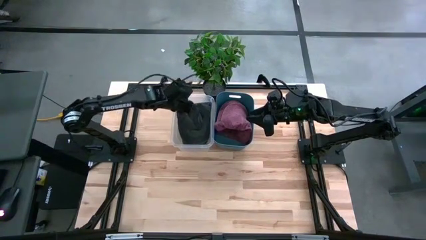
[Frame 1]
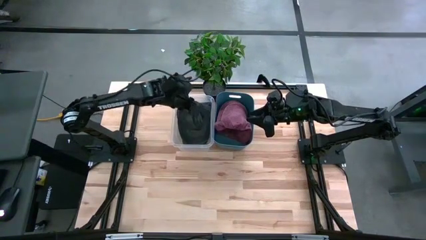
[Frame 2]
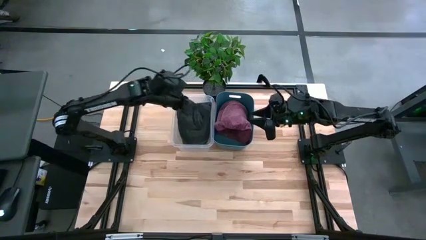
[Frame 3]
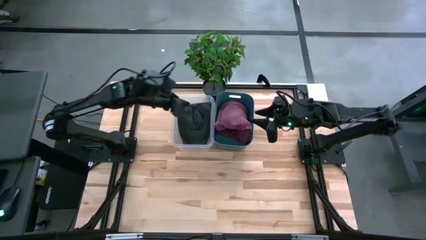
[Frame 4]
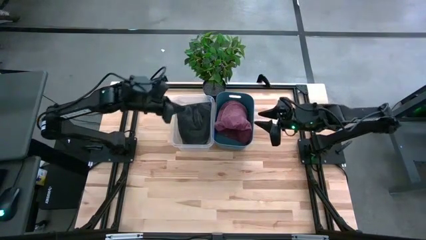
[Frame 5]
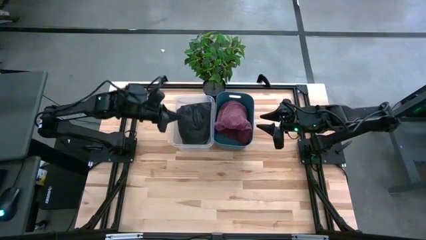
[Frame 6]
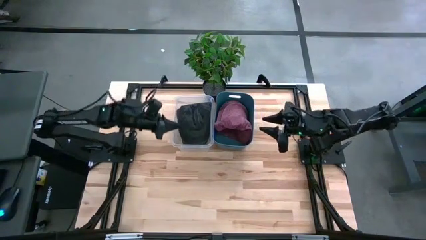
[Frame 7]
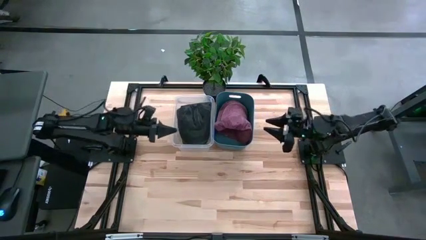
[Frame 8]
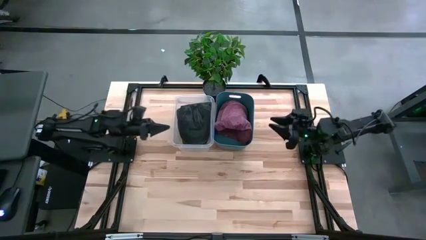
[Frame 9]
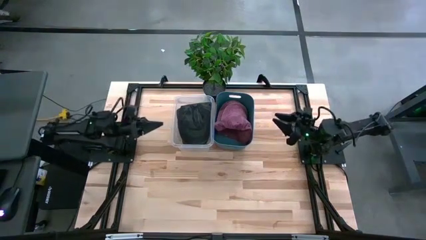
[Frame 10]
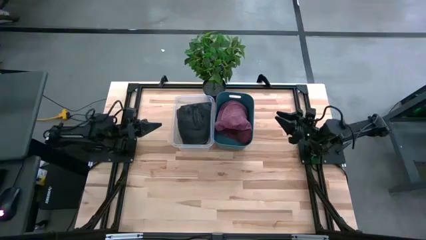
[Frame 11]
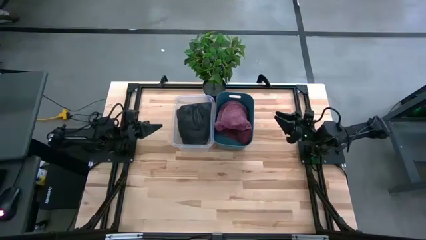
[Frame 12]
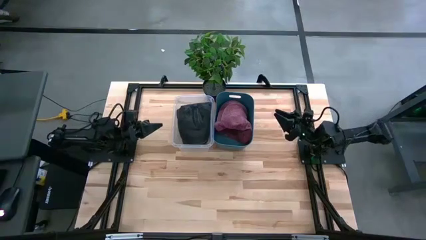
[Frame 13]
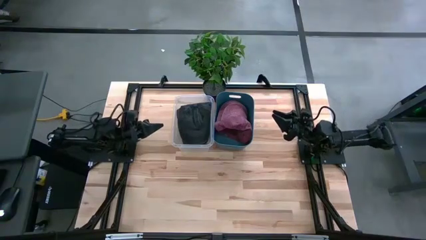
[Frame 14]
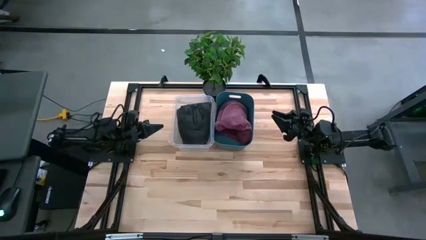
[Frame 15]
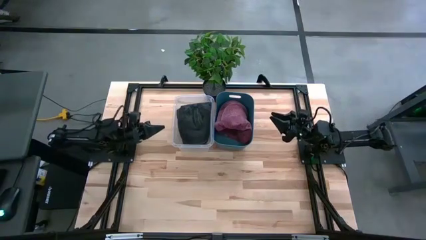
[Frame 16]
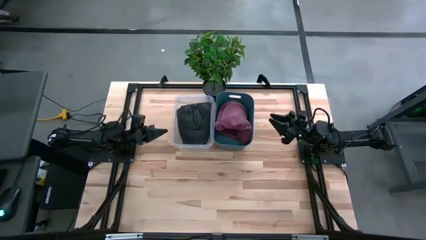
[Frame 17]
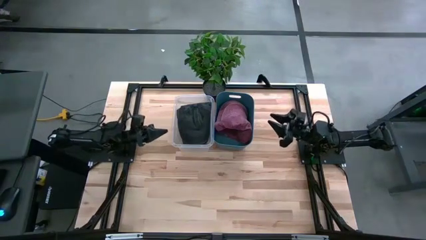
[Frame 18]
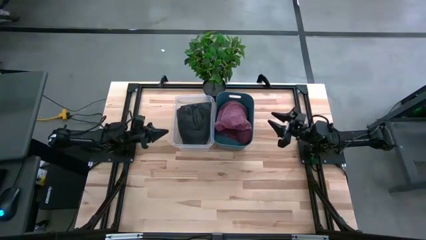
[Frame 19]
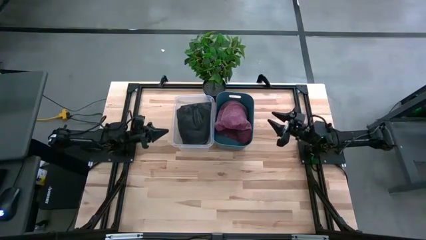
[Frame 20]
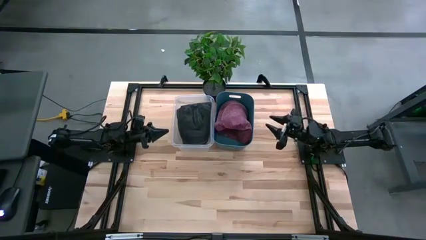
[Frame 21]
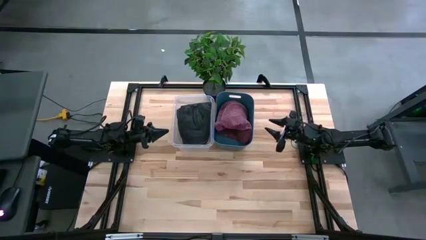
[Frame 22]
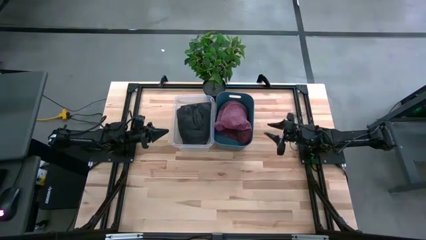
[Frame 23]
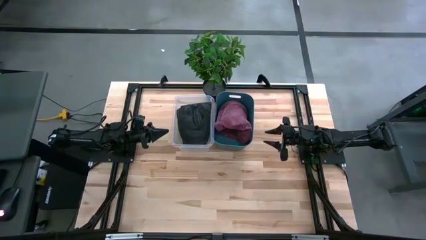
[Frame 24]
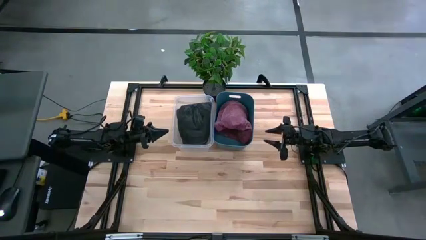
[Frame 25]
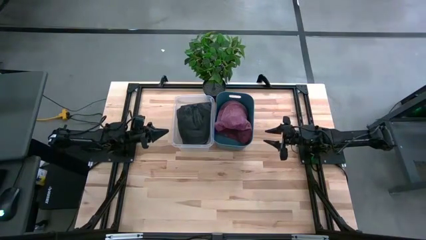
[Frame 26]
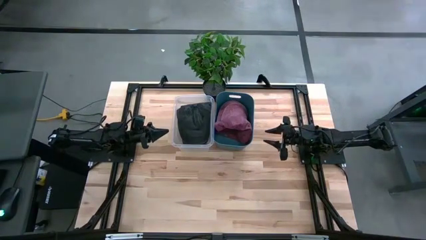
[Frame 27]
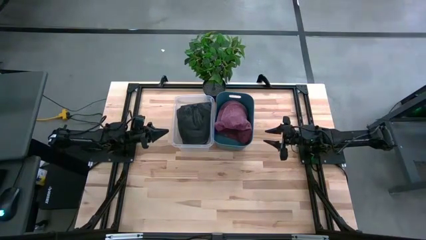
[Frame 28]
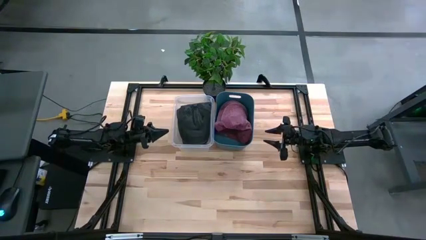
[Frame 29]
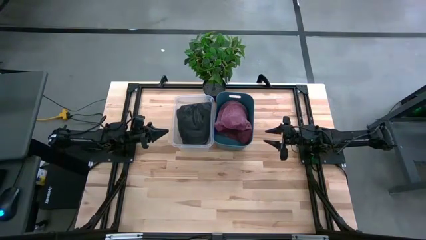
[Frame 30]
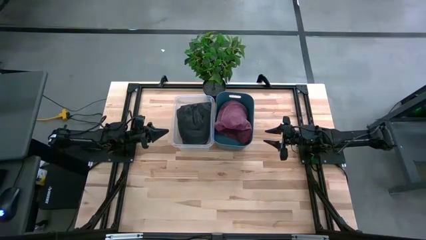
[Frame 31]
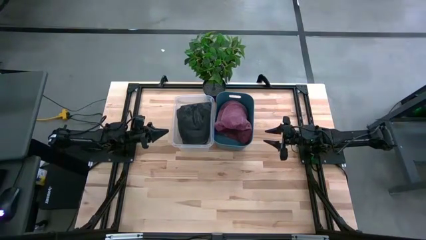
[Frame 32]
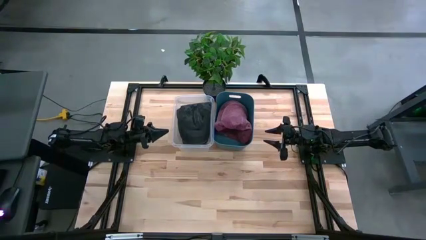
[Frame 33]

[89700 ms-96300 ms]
Task: Pick & Place hat
Return to Home Position

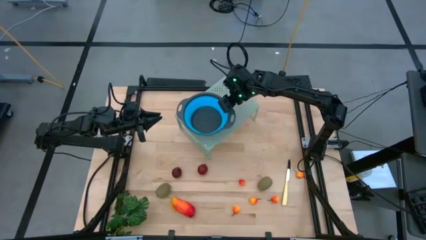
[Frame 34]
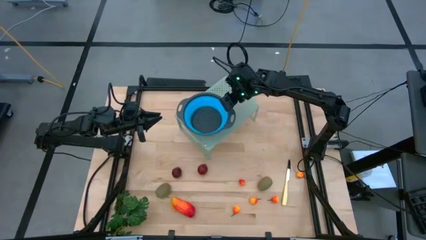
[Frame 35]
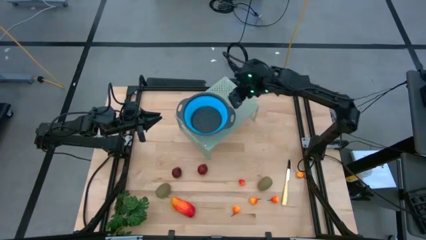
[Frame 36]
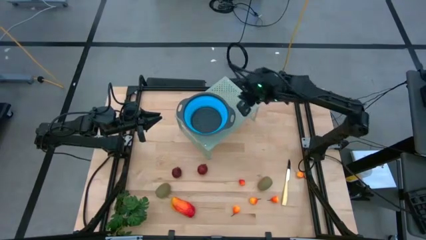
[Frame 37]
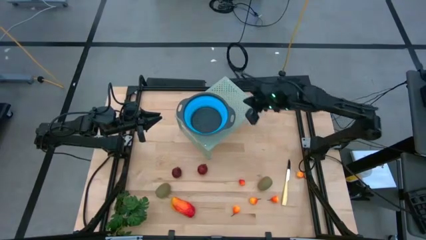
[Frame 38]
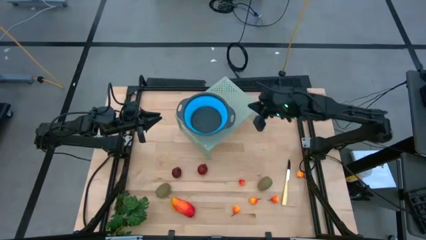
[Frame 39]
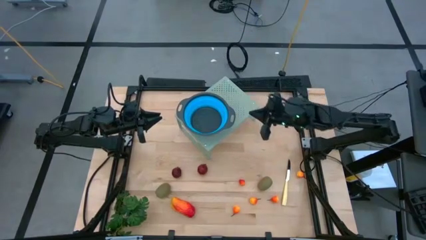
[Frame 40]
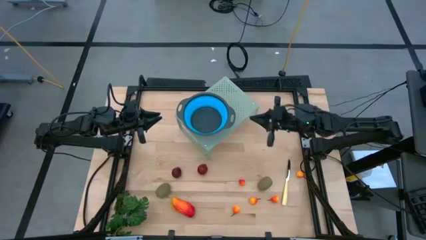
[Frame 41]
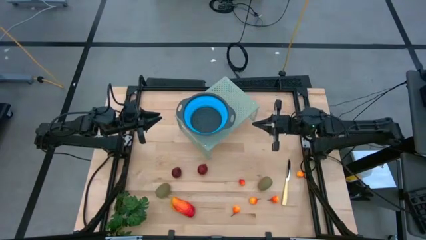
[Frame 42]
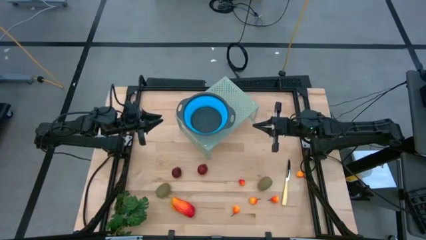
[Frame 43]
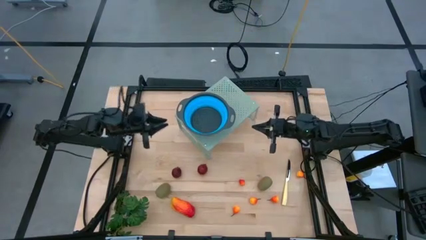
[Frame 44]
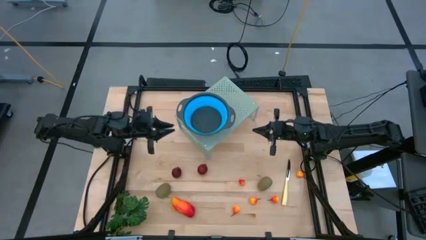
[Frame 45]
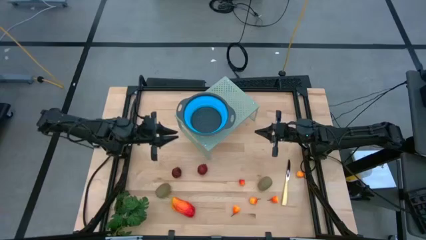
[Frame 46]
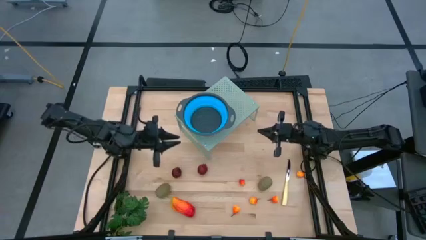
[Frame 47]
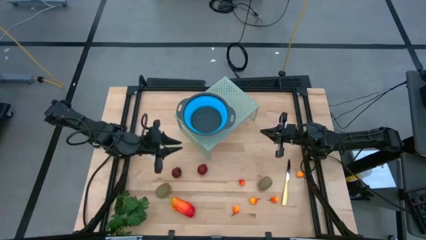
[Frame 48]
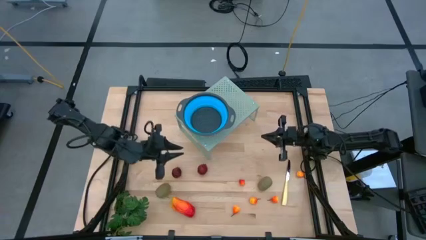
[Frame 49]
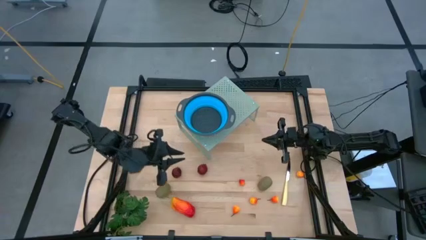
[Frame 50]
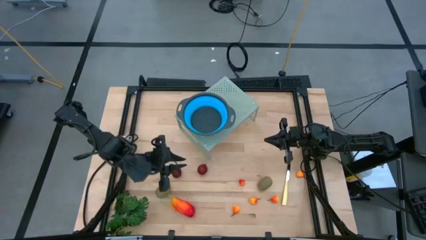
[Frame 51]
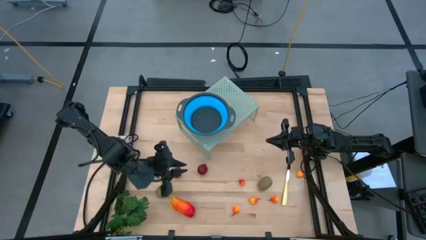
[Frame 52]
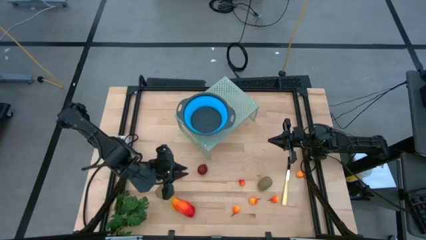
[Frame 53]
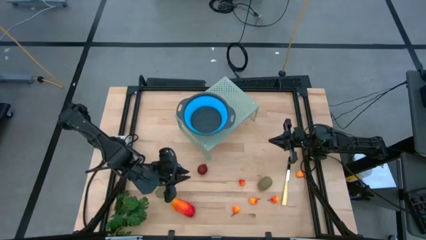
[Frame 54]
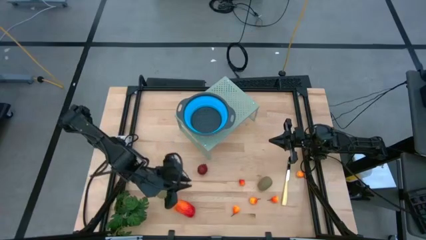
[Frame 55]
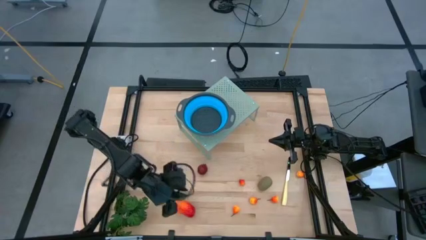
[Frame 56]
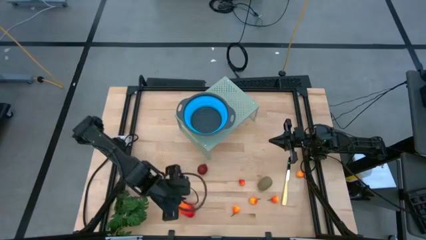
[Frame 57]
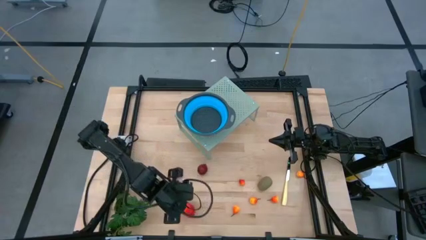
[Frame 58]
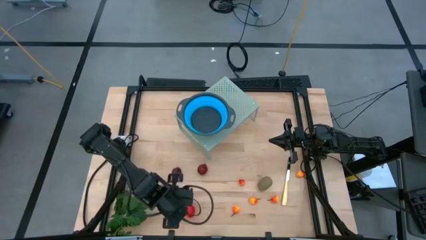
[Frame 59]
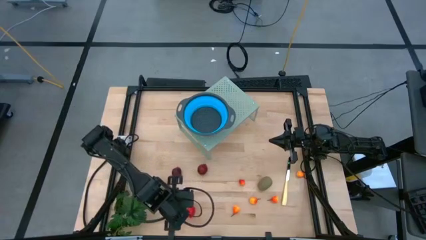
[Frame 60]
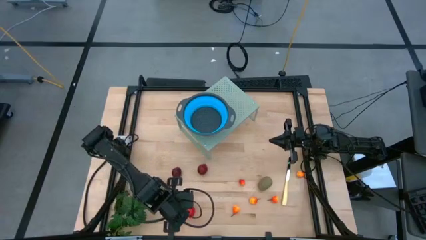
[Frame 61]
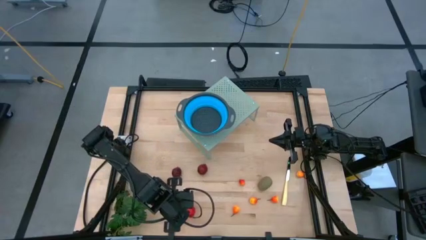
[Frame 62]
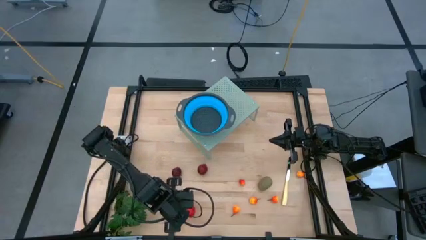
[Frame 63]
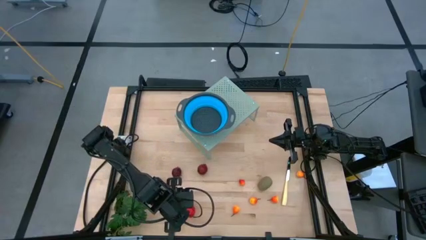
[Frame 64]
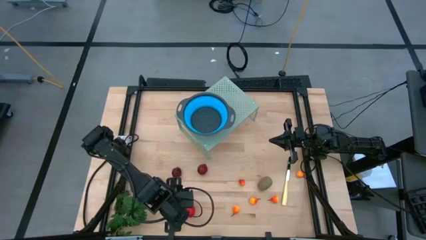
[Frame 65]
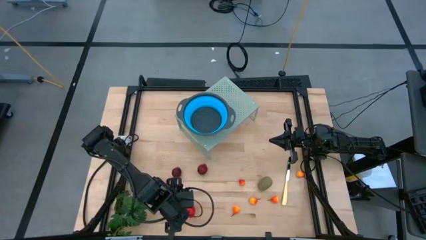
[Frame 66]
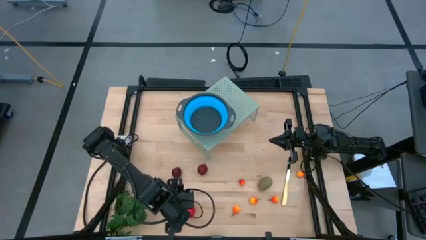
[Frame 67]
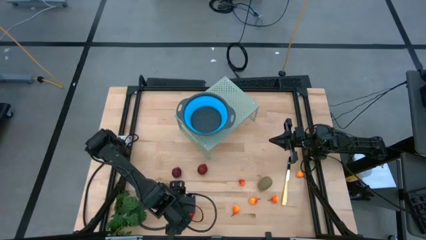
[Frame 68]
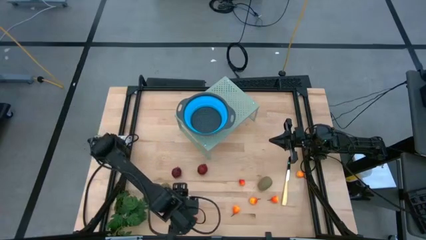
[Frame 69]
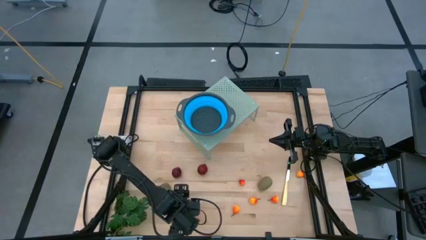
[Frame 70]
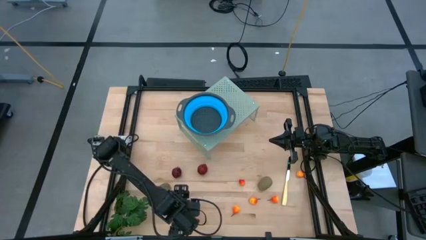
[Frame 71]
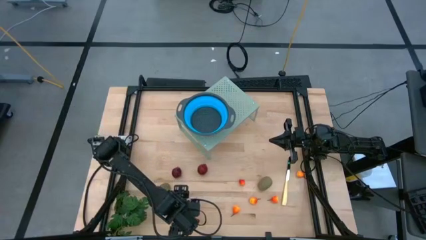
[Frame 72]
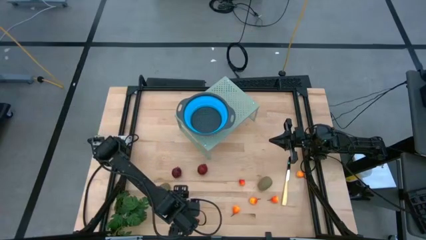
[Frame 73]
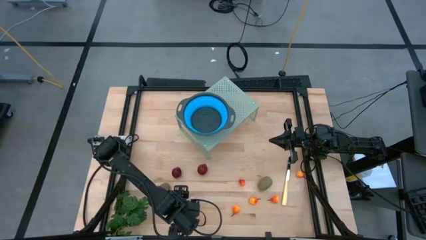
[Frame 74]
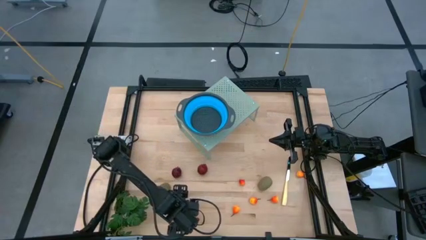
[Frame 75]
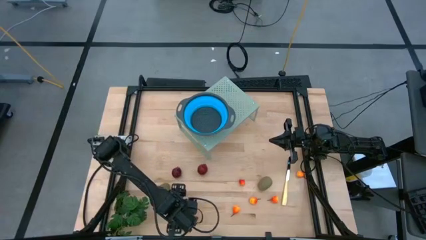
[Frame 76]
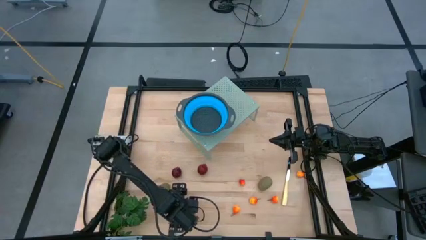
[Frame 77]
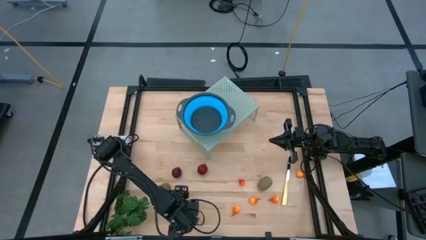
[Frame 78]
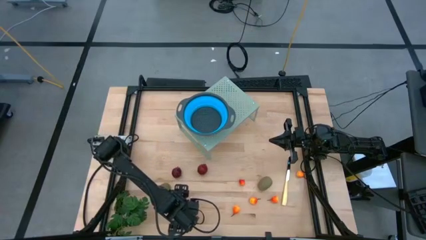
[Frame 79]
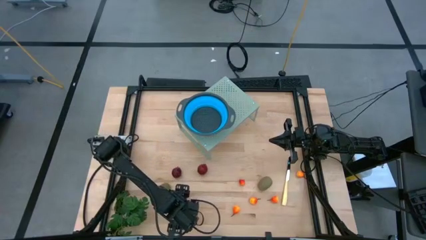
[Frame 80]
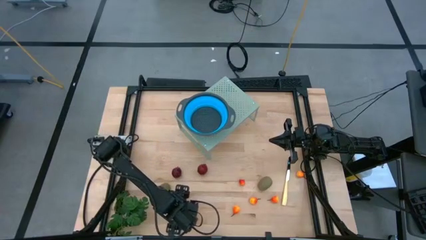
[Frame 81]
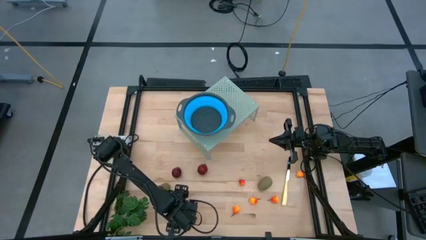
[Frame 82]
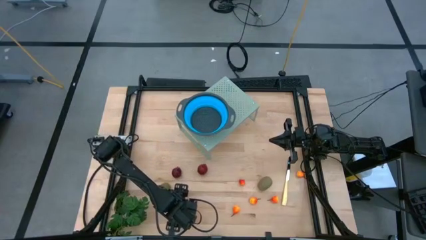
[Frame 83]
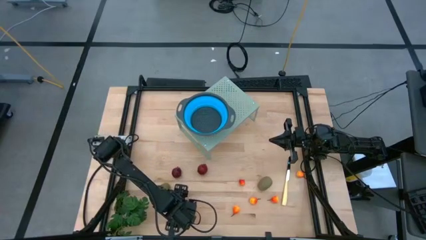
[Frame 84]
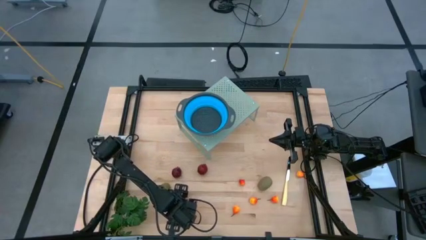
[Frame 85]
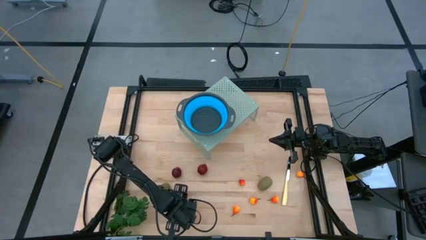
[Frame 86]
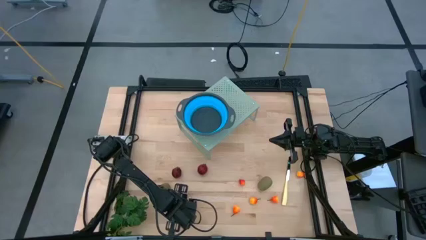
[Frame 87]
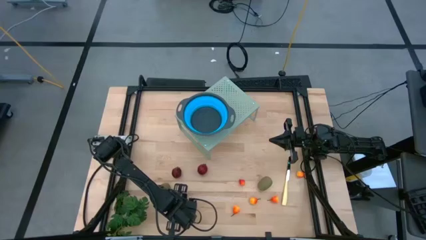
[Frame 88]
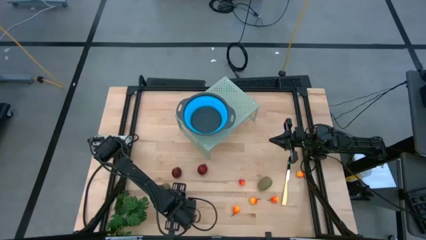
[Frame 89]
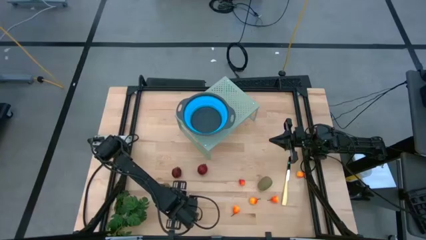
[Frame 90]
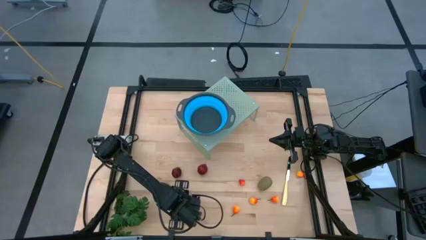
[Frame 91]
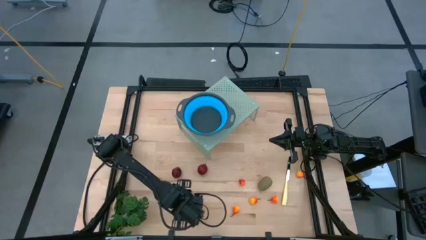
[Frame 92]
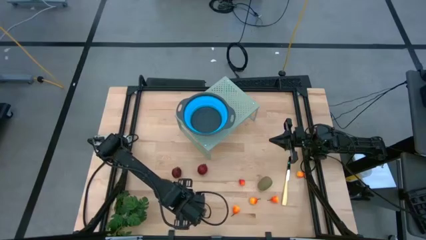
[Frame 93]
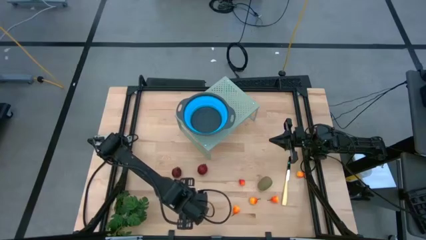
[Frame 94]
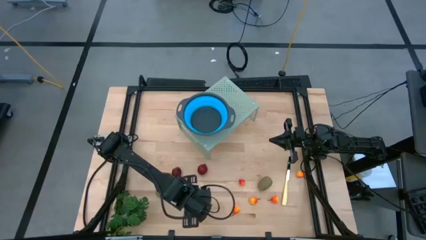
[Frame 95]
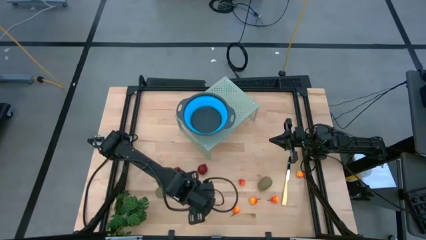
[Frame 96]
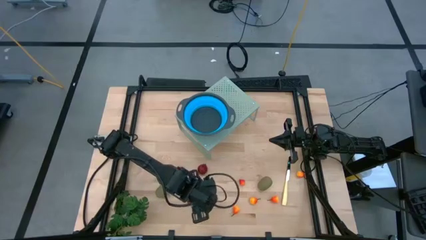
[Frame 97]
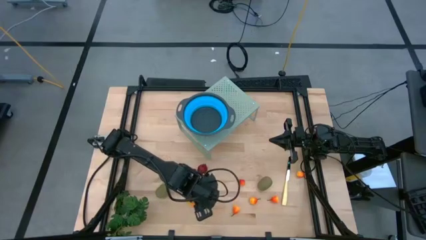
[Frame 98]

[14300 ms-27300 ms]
Task: Pick & Place Fruit
Put the mango into the collapsible colander on the shelf
